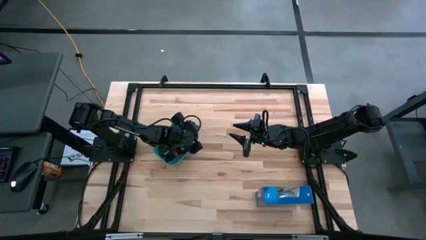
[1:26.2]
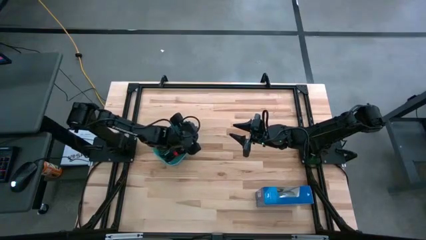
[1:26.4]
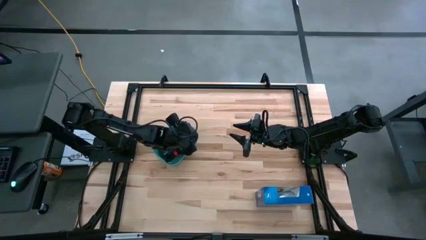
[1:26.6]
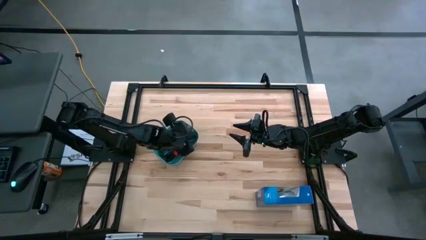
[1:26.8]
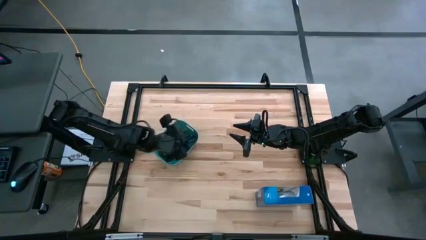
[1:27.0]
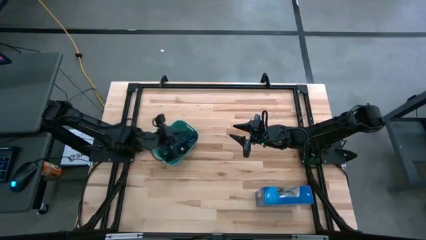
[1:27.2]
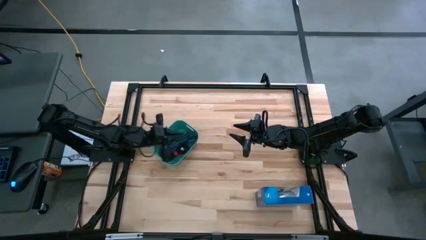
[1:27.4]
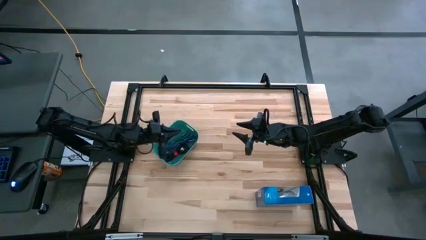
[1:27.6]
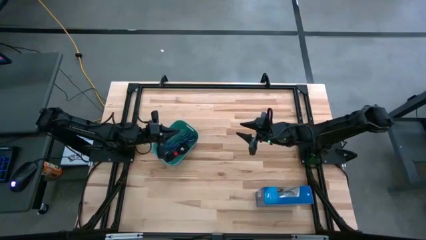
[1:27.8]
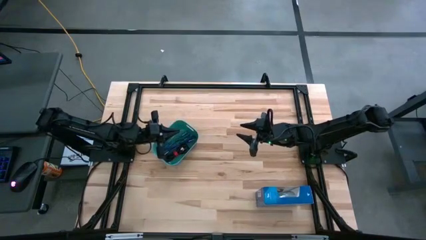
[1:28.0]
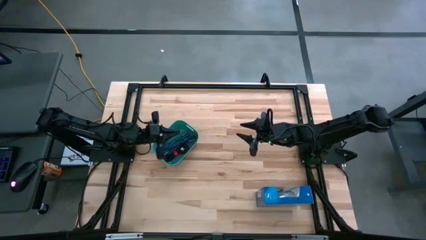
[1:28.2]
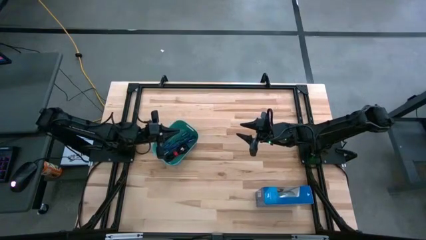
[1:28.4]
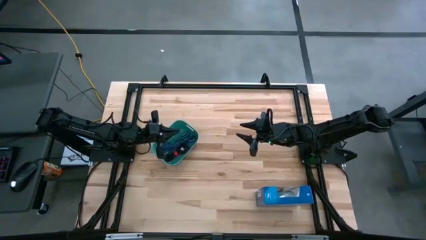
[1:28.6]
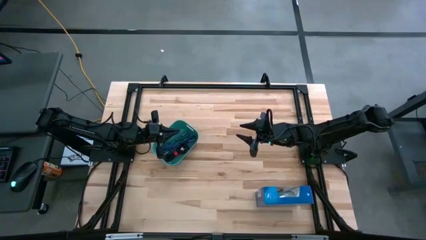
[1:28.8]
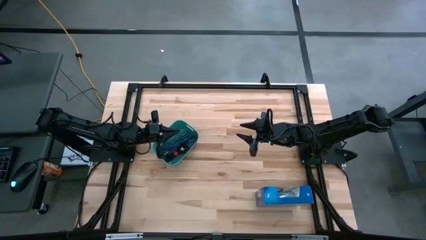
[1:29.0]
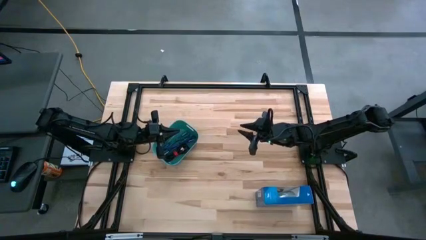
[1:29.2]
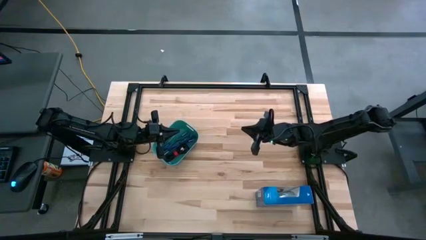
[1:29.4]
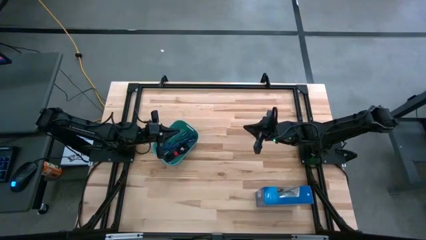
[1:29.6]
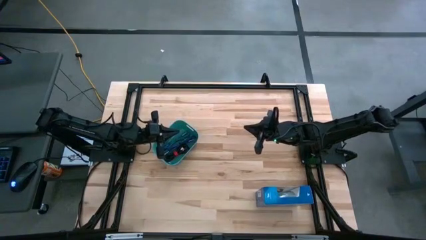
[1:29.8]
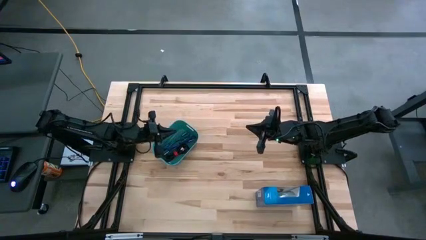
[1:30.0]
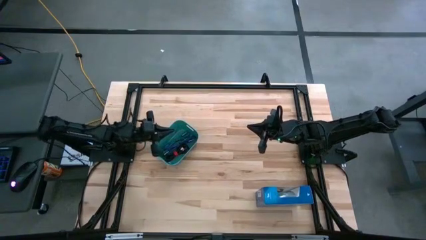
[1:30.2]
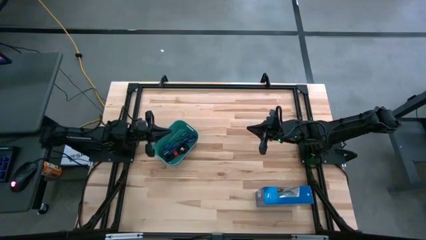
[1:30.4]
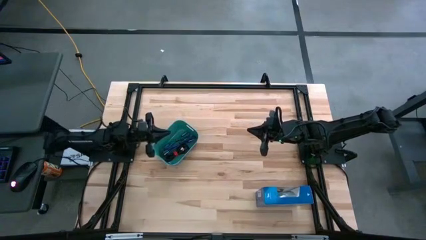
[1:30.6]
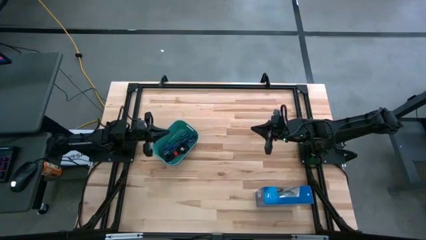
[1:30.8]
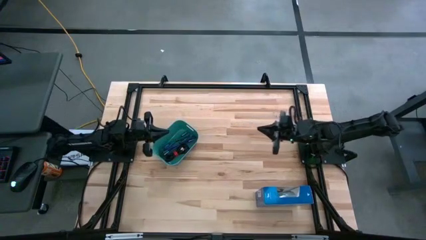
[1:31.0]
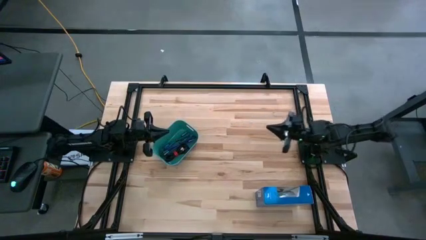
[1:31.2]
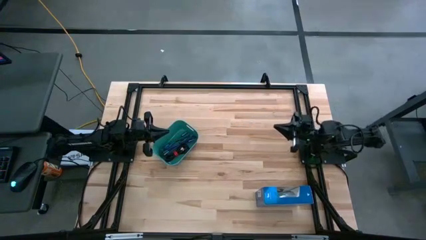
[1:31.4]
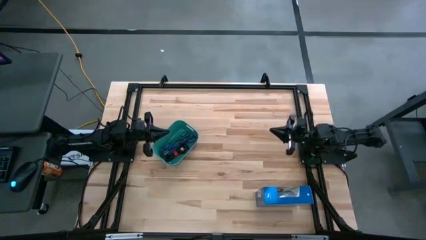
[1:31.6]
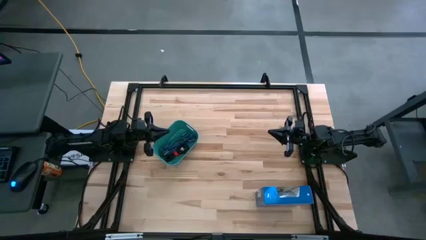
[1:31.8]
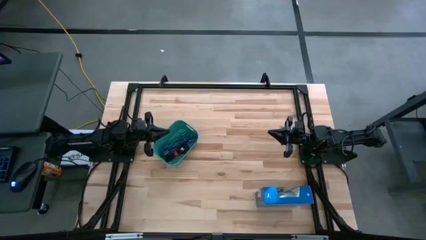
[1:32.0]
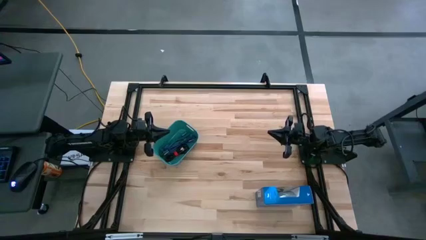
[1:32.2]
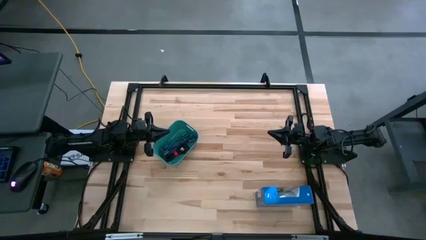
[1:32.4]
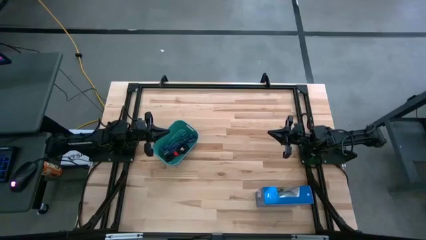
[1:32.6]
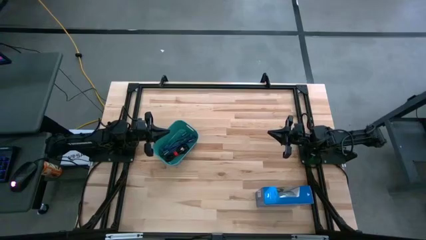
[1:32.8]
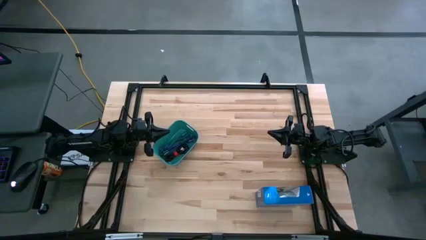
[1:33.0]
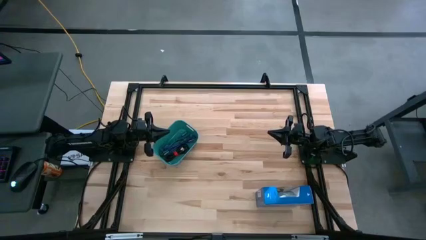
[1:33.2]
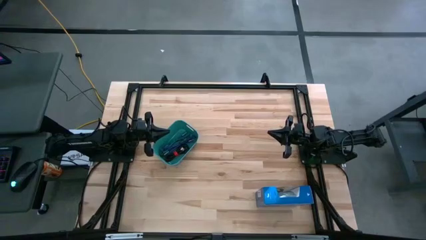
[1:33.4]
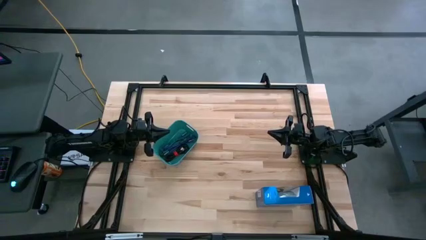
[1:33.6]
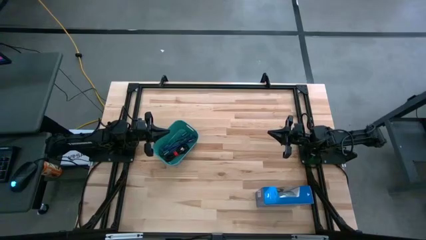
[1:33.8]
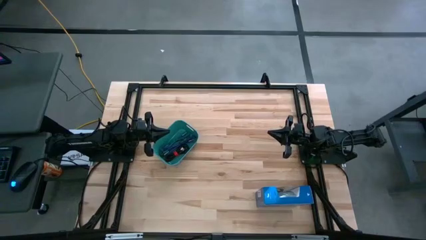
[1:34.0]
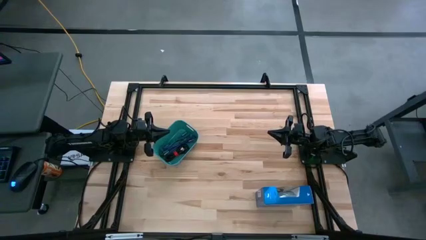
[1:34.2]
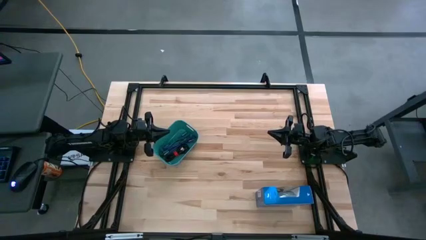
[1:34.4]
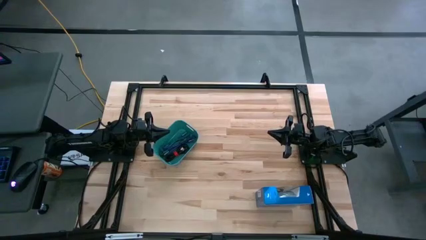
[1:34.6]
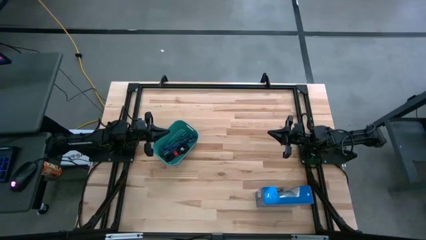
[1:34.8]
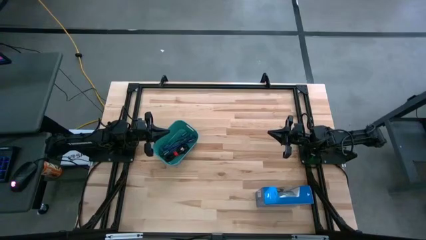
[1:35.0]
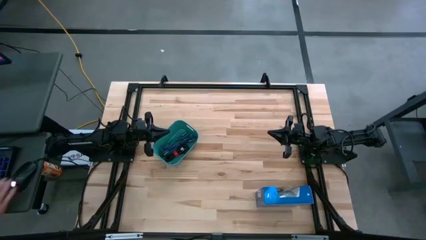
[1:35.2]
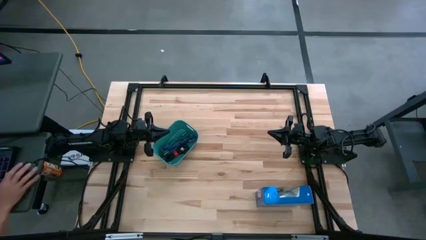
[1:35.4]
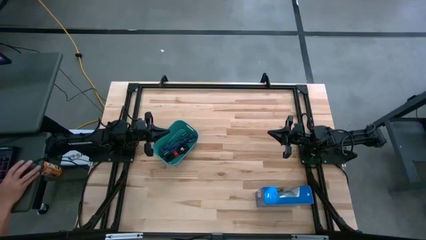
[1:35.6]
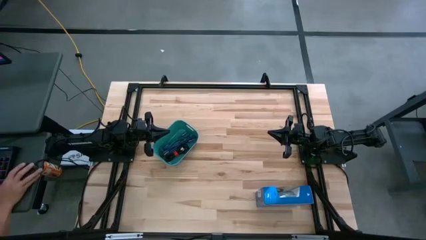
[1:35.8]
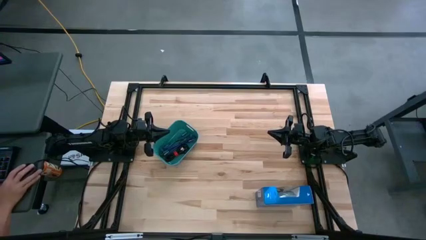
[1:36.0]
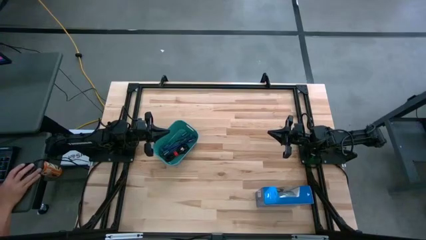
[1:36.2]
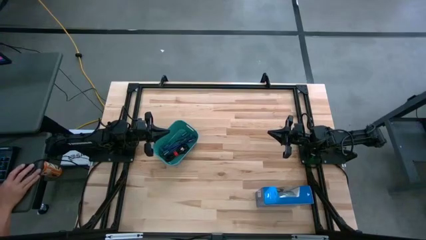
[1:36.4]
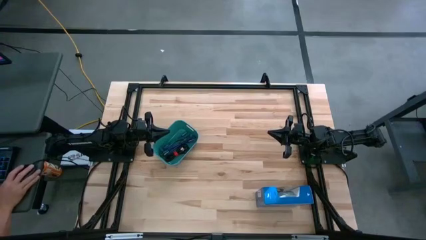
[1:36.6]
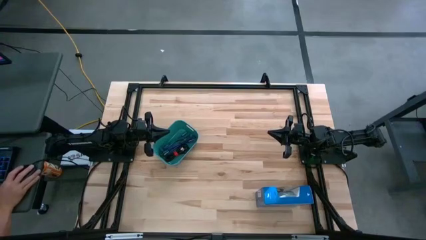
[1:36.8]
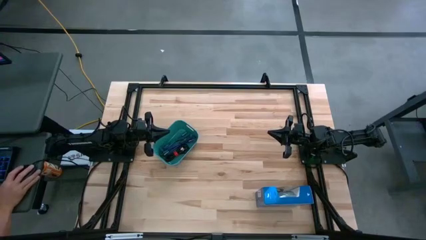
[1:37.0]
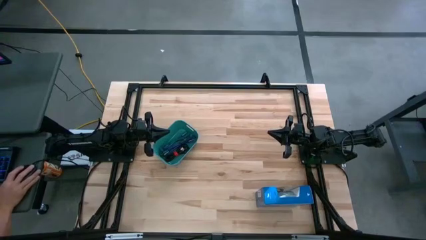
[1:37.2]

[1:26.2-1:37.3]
Task: Pick and place USB-C Cables
Return to Home Position

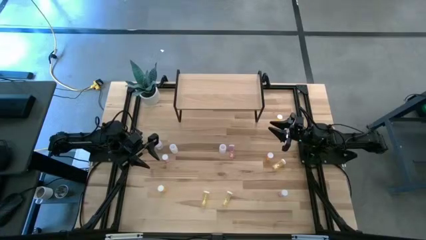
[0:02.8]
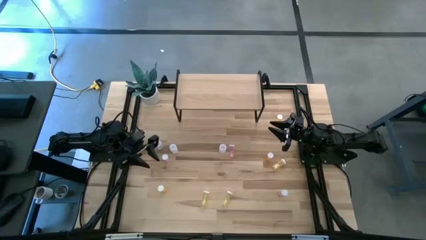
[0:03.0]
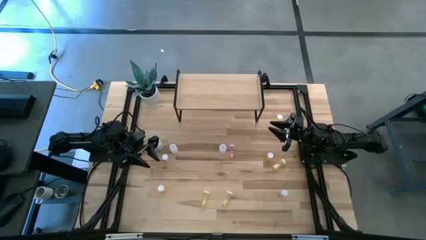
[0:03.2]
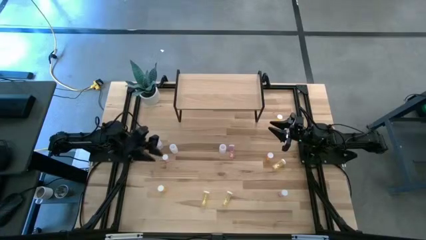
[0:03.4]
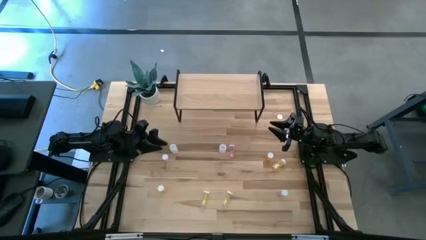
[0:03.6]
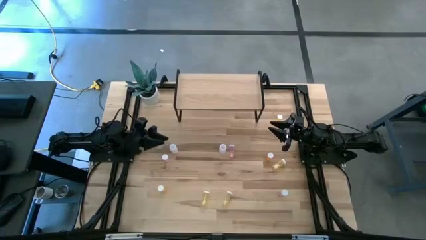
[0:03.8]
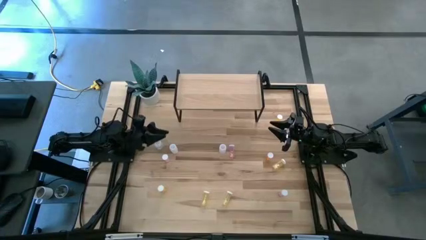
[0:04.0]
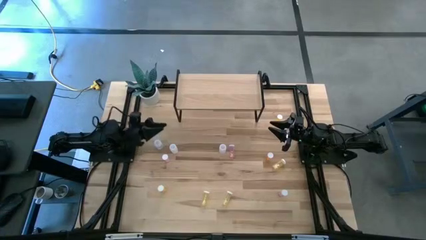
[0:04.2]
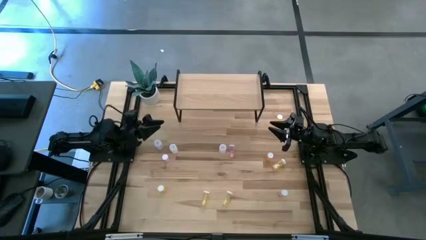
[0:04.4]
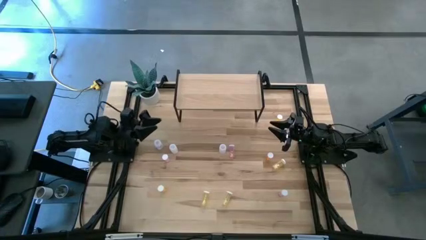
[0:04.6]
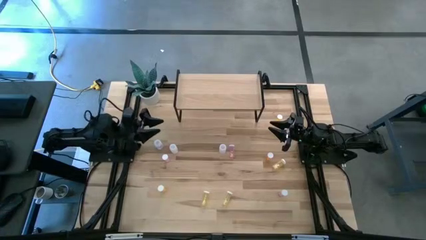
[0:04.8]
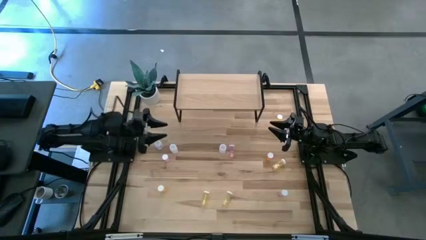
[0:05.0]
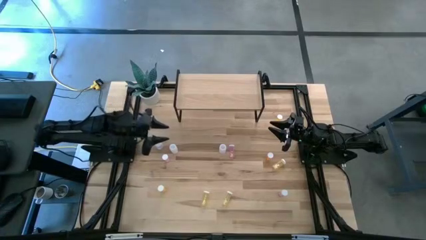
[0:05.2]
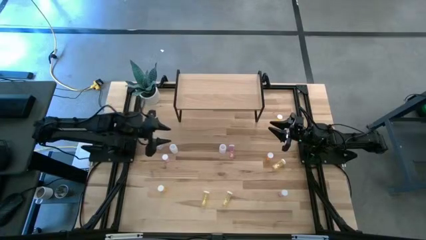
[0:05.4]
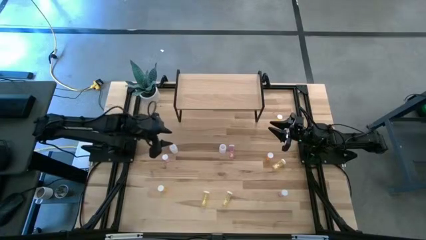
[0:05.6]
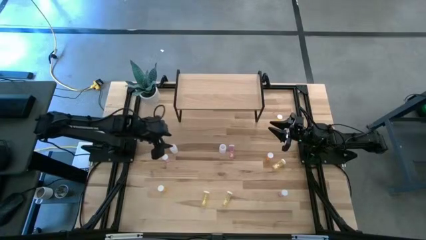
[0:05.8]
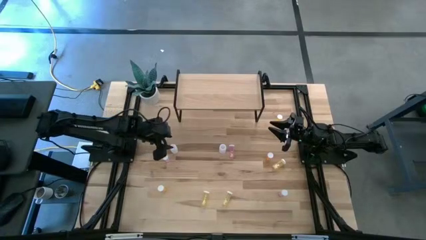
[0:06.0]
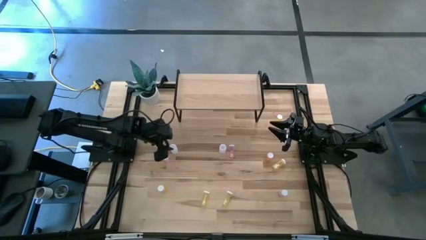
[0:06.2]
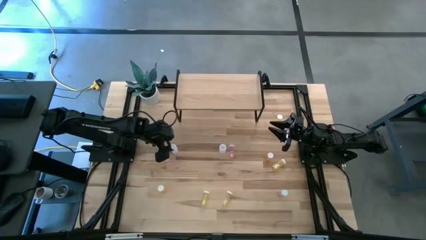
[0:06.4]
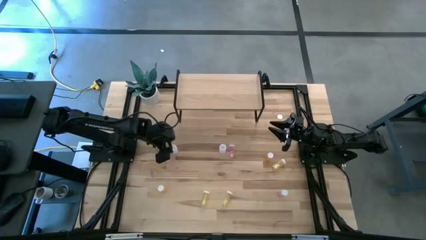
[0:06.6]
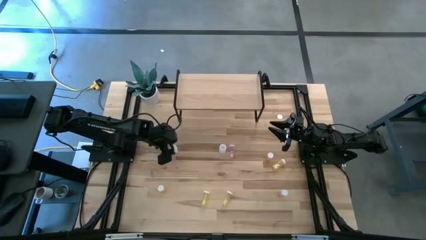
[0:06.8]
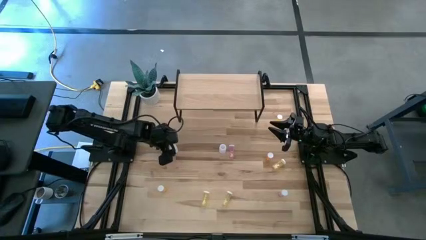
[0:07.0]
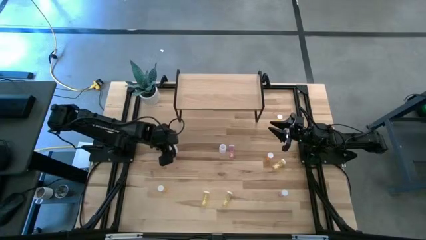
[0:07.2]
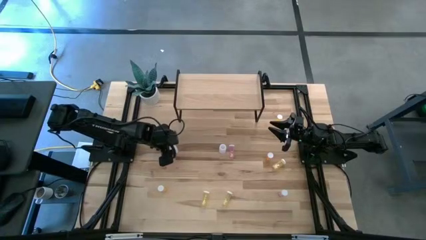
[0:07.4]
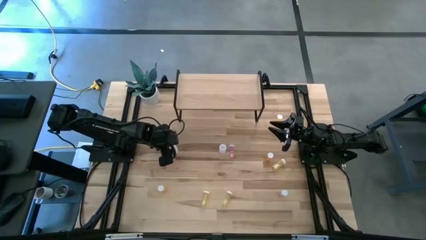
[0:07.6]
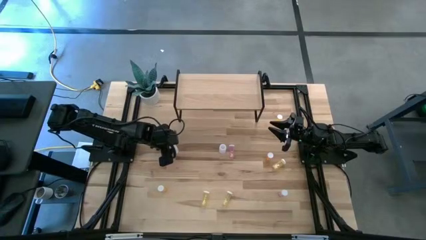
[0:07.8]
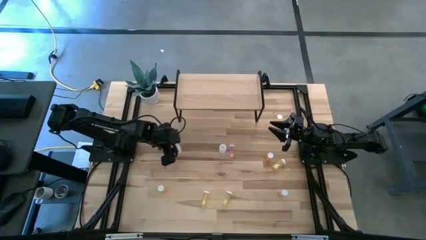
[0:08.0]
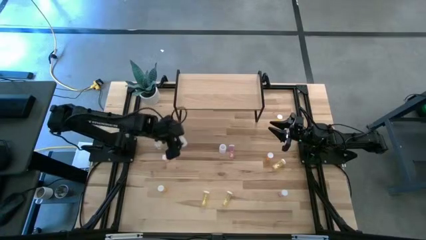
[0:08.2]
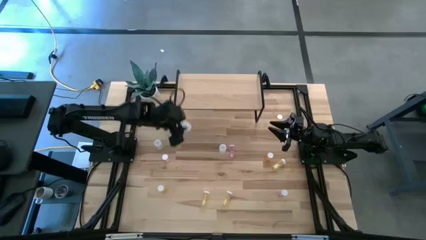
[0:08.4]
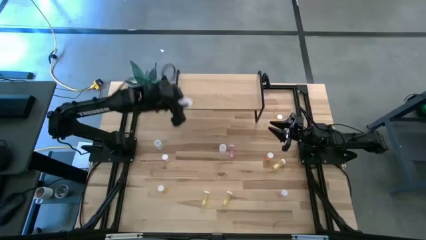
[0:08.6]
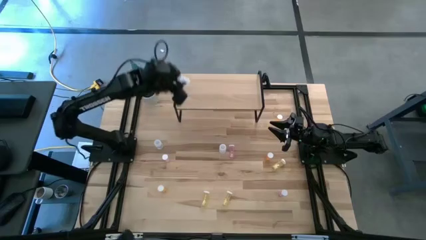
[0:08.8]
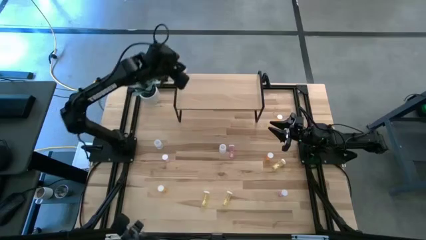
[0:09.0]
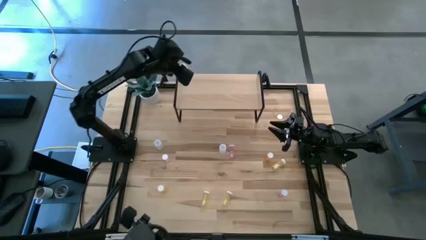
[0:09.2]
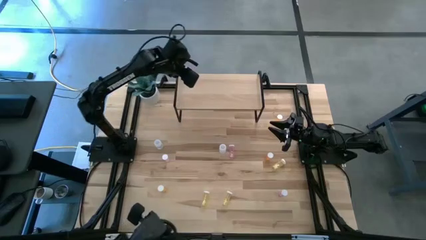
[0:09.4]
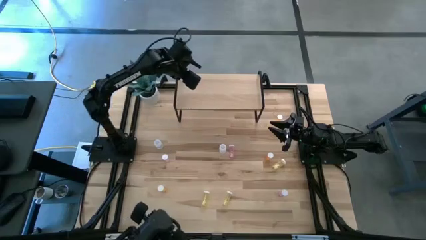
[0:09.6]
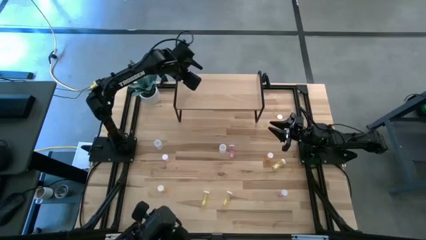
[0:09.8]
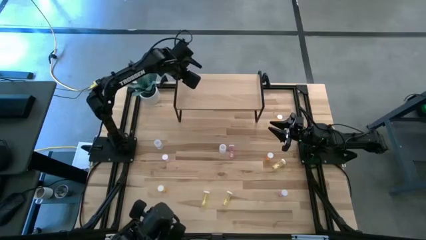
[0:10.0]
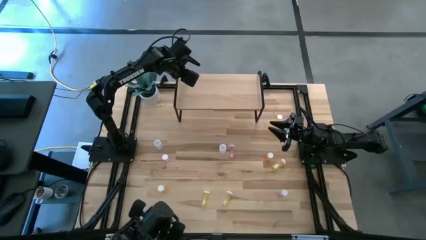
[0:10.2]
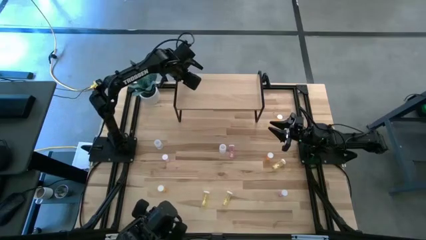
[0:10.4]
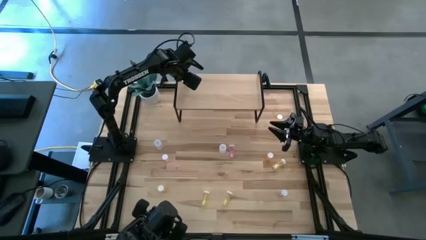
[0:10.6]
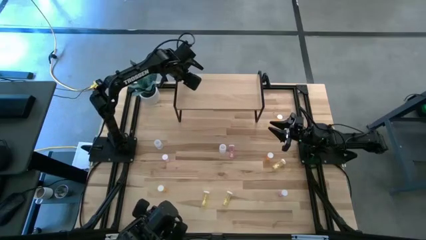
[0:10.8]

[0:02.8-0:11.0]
Task: Pick and place medicine bottles onto shelf by color
Put the middle white pill bottle on the shelf
